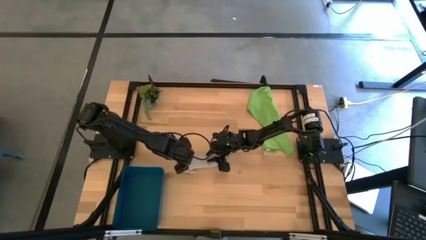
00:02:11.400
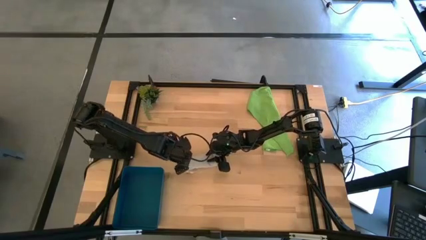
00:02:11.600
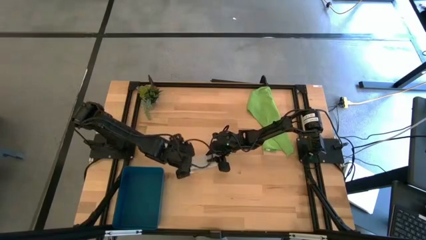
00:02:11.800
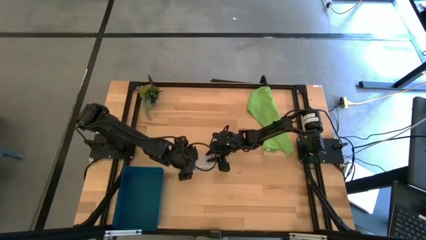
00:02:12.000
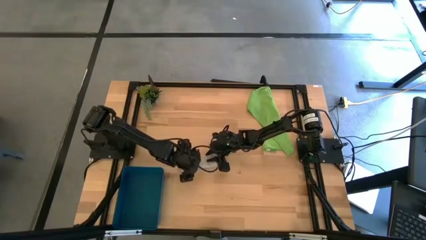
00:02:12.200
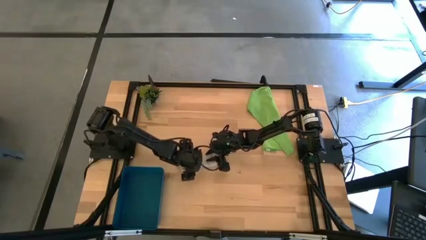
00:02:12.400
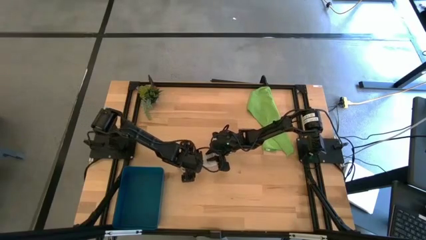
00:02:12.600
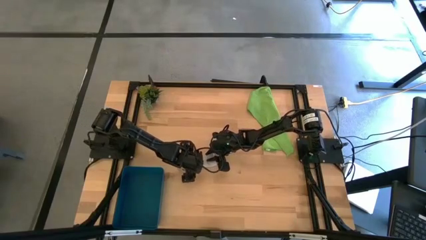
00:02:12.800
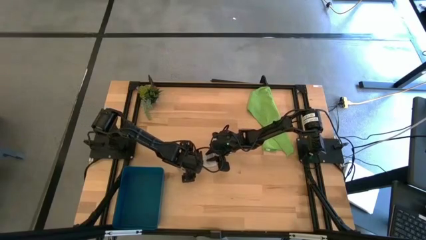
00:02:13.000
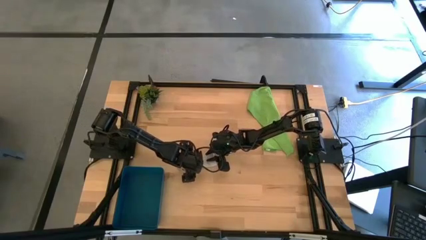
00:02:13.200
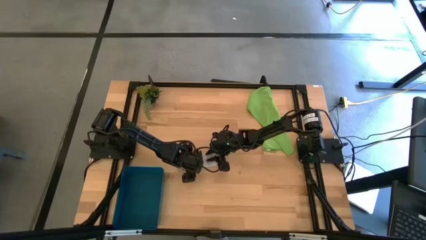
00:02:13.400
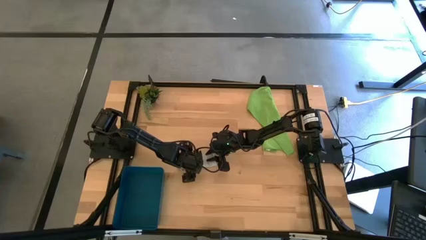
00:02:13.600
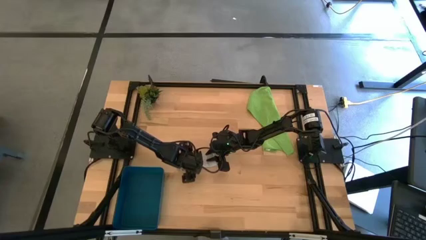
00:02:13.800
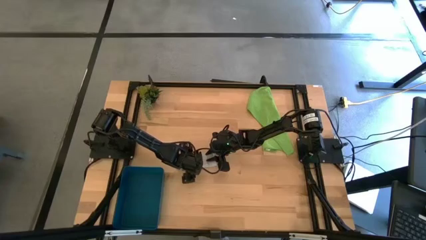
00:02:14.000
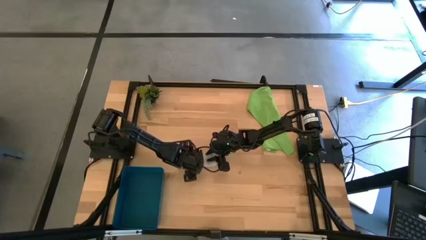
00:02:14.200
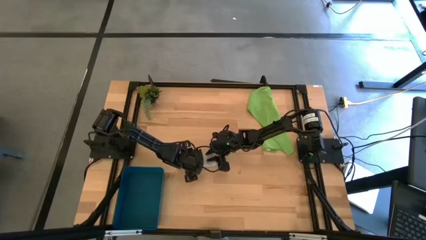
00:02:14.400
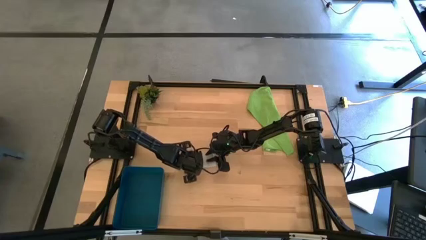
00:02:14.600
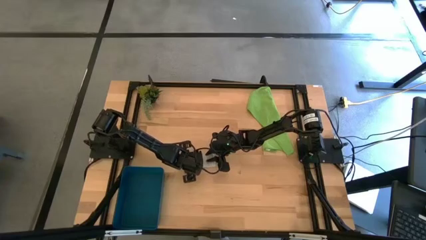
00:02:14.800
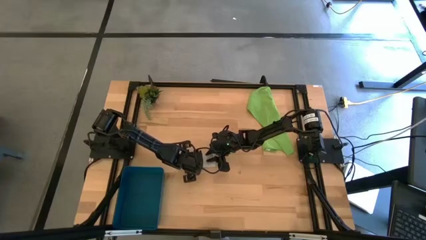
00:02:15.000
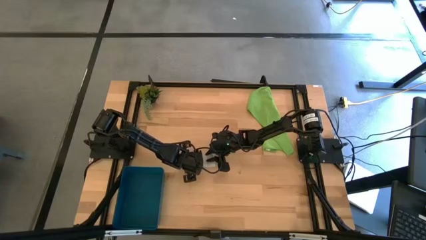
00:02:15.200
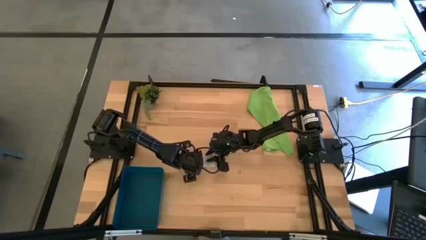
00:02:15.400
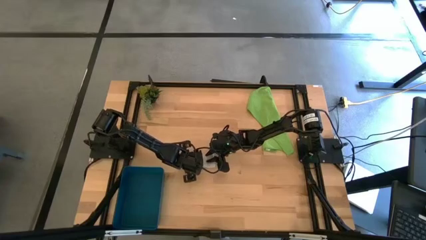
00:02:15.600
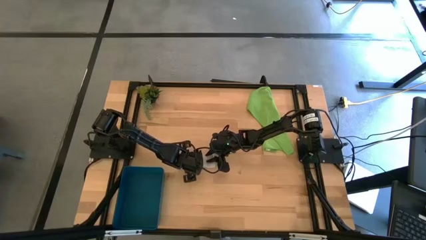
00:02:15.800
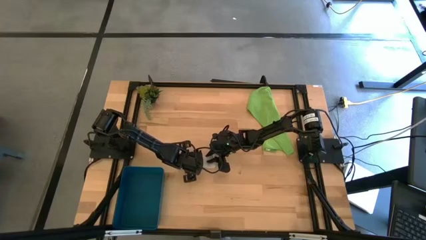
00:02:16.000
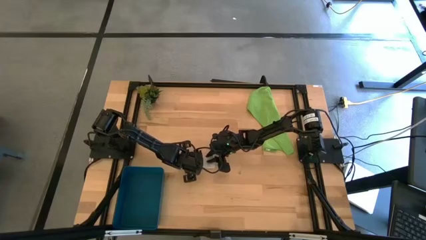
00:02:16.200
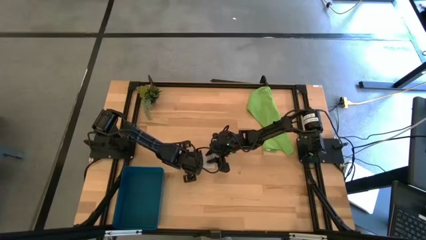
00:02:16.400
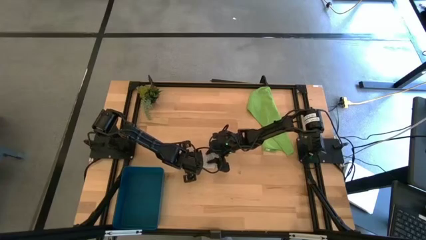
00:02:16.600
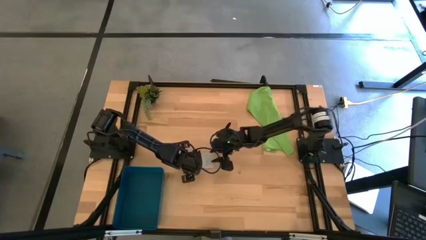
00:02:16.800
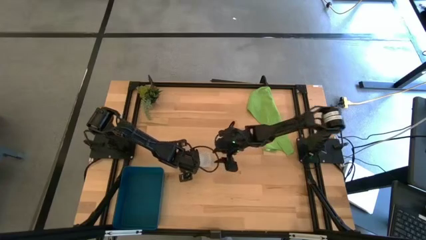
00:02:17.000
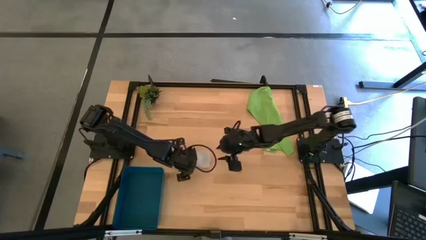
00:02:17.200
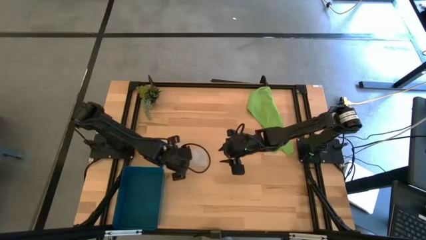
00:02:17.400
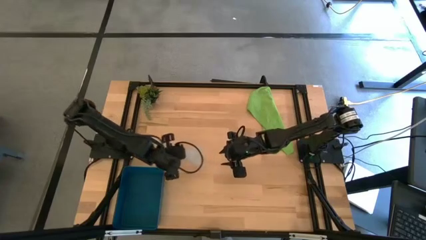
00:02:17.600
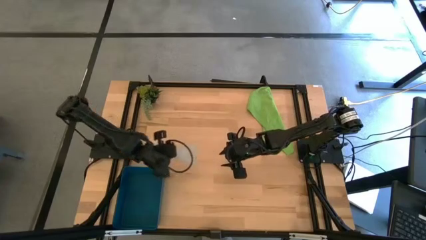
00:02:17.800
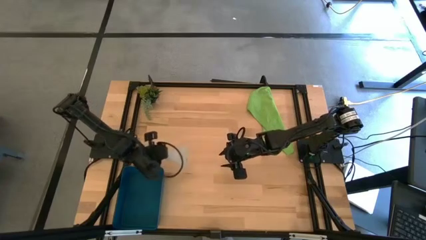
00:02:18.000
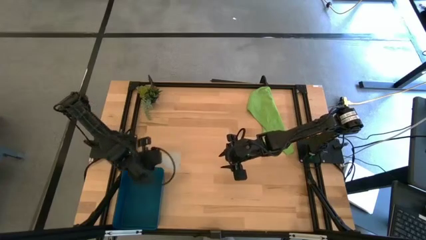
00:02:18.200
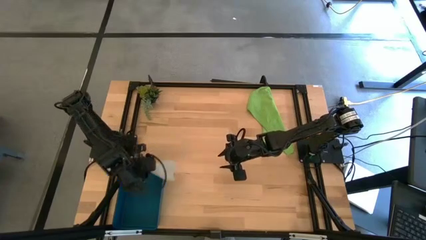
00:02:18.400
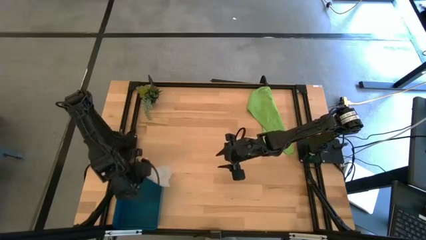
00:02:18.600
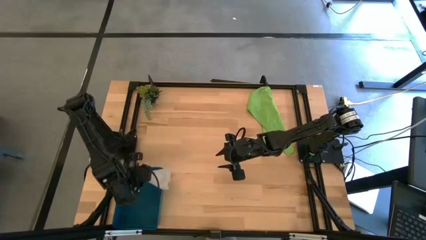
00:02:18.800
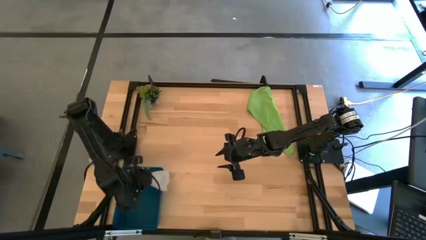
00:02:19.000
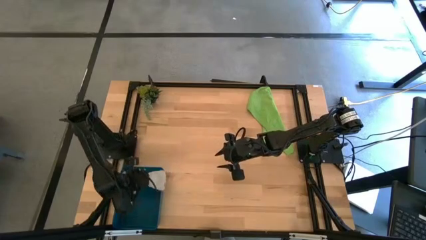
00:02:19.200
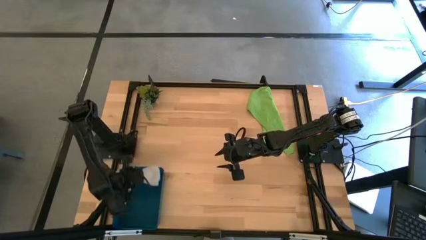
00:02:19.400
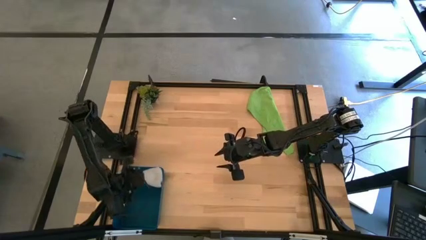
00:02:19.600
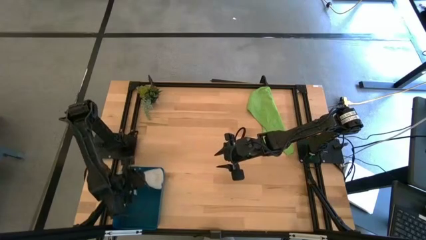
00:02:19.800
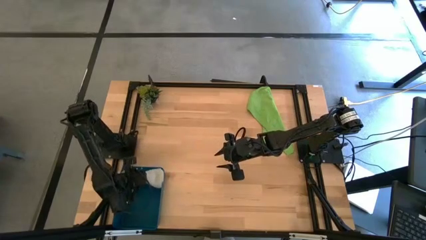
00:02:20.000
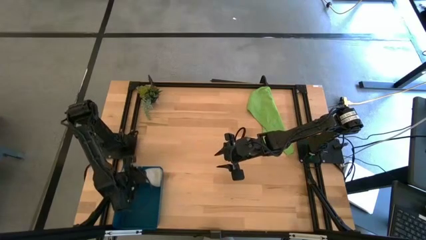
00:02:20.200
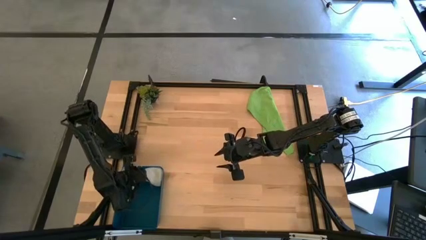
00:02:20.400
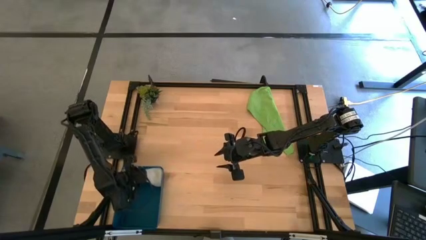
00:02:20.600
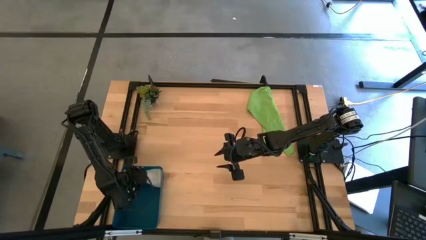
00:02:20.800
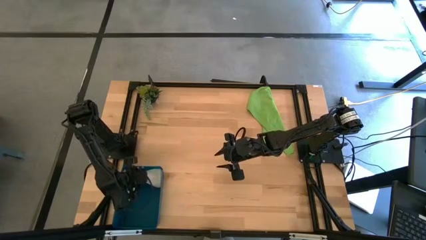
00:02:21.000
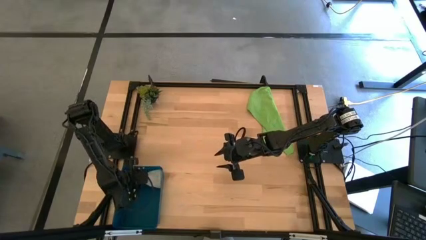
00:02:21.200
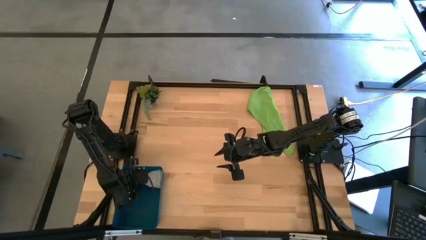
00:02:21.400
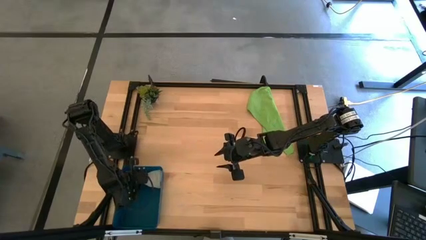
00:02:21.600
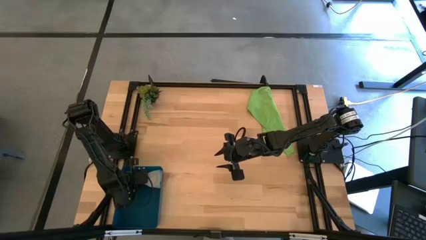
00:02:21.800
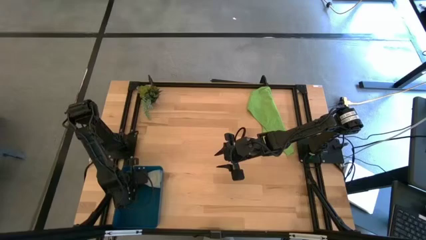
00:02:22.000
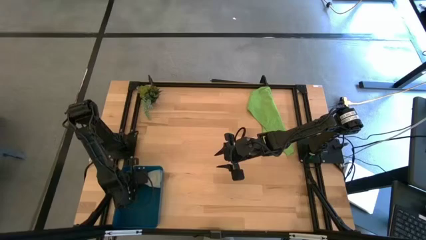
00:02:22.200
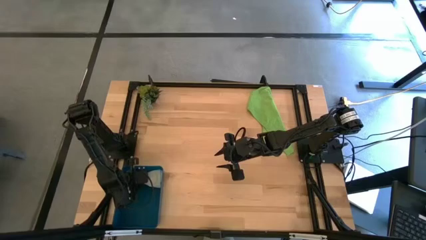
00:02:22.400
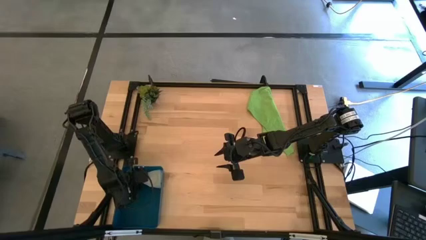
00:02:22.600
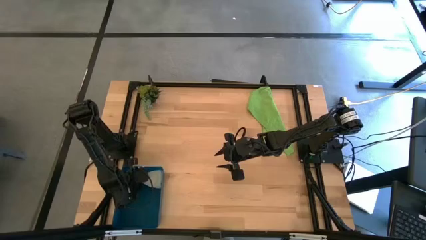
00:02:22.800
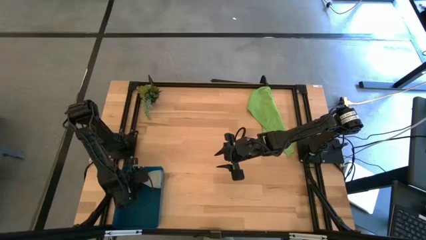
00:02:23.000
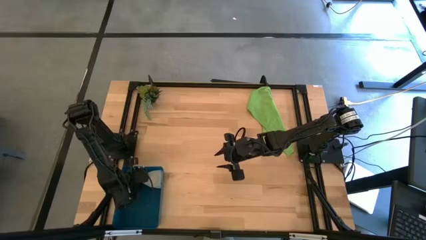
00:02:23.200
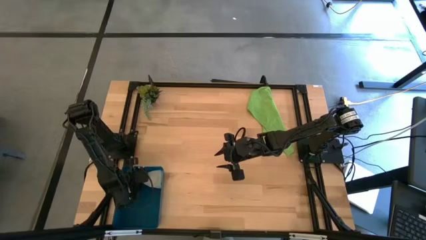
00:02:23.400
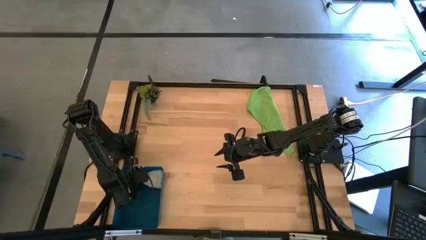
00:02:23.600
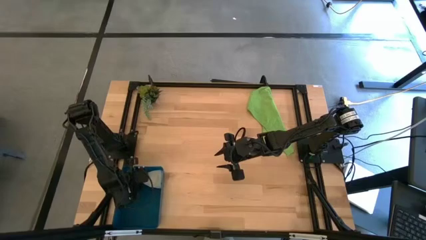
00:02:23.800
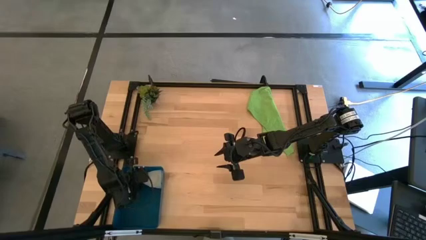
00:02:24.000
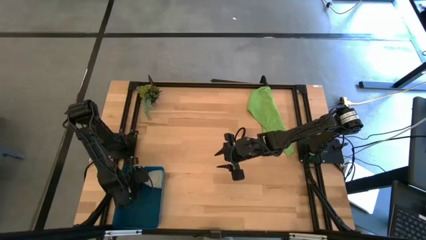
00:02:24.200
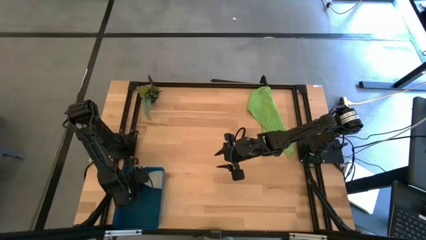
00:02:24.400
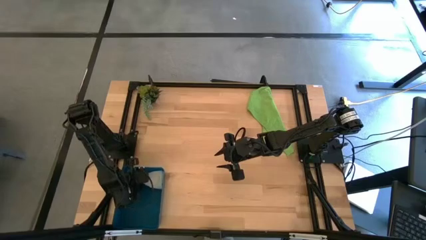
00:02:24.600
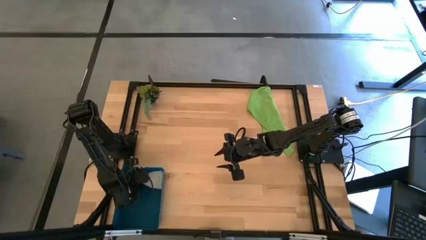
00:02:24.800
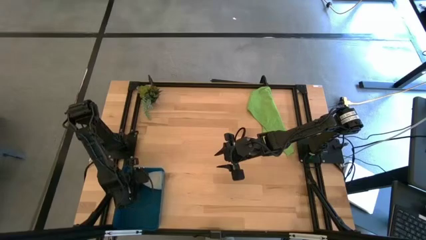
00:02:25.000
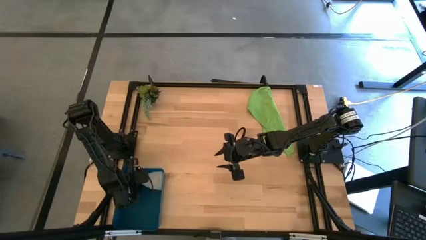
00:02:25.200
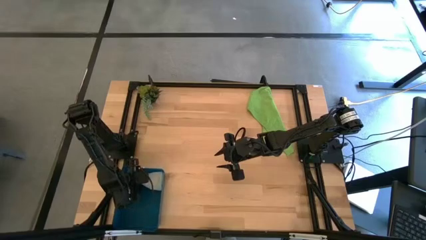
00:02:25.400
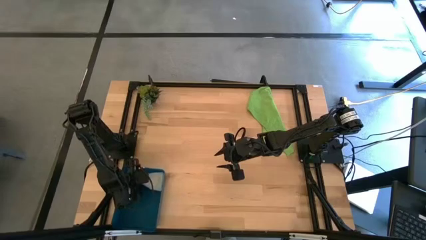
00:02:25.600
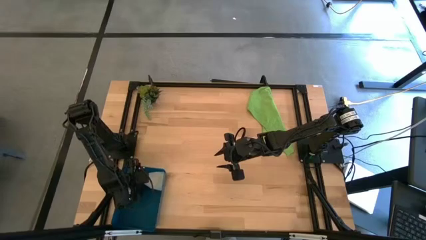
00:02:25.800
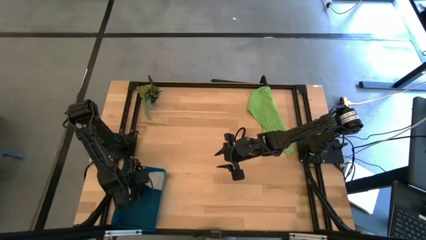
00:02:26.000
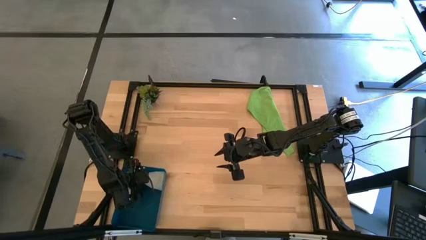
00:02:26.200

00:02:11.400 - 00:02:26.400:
Task: Roll microfiber towels into tight, uniform cylinder then place into a basket
Put the rolled gray towel into the blue bin
